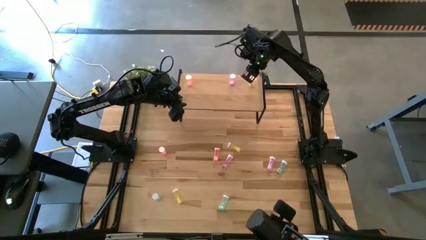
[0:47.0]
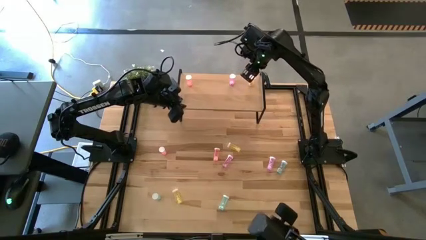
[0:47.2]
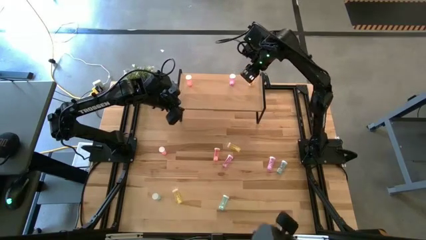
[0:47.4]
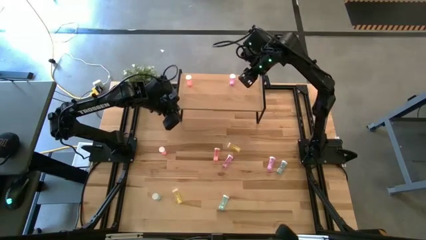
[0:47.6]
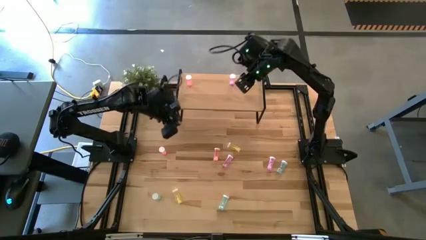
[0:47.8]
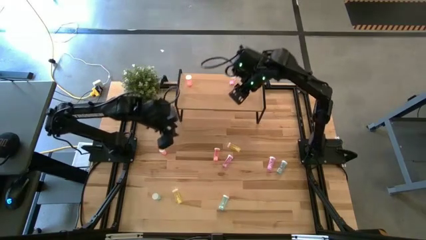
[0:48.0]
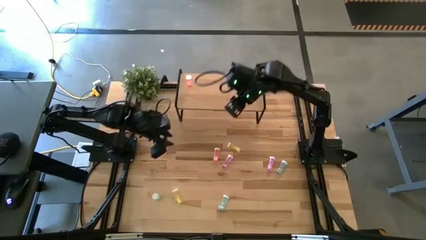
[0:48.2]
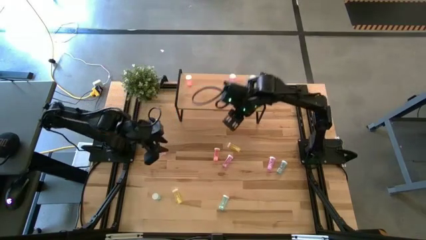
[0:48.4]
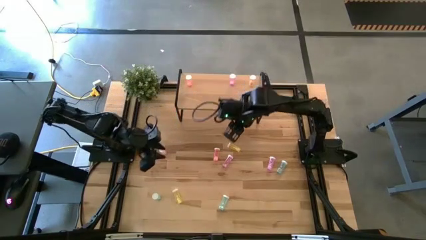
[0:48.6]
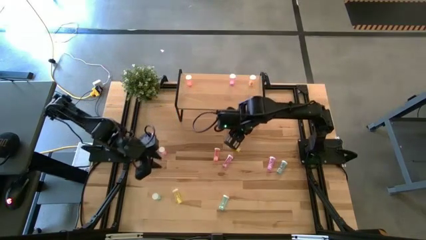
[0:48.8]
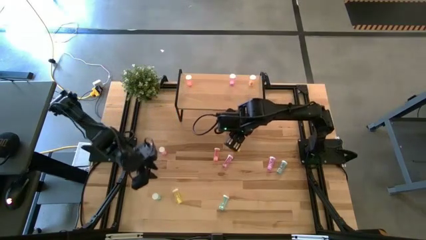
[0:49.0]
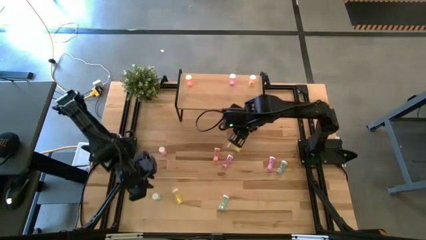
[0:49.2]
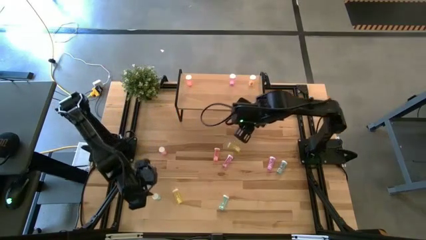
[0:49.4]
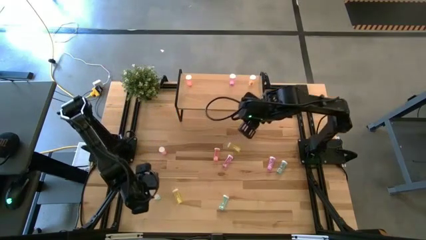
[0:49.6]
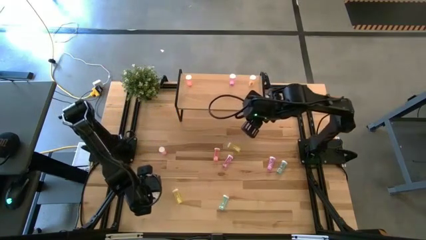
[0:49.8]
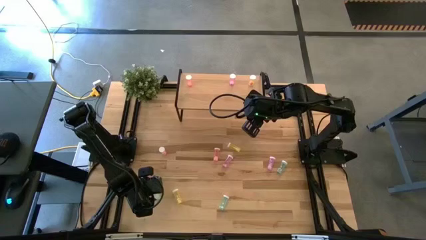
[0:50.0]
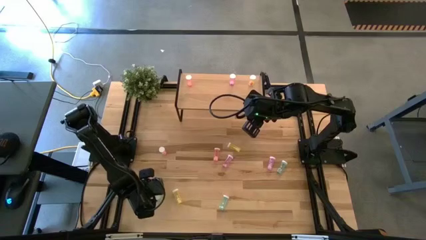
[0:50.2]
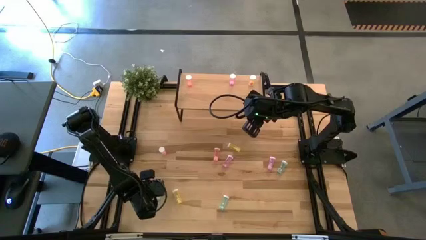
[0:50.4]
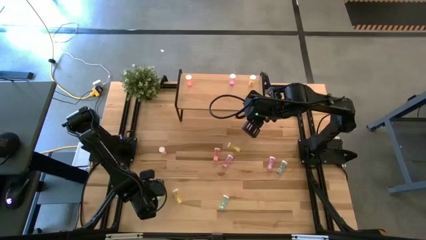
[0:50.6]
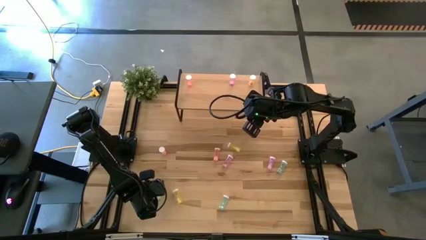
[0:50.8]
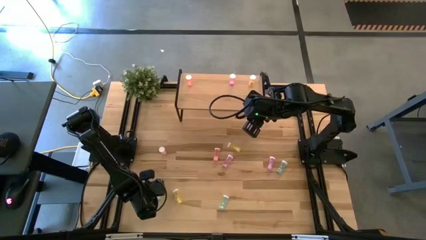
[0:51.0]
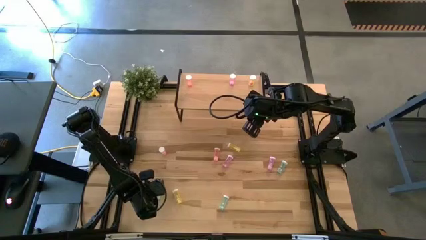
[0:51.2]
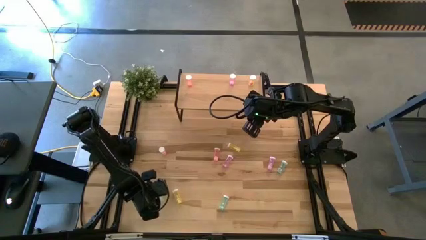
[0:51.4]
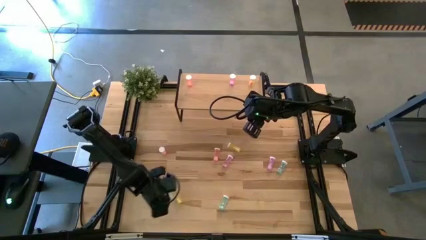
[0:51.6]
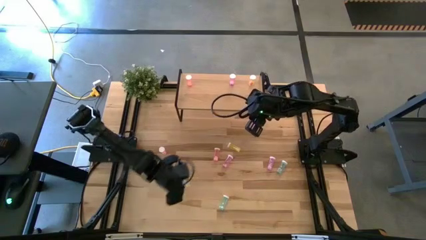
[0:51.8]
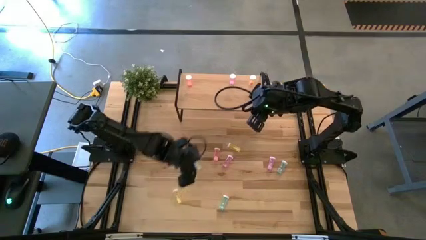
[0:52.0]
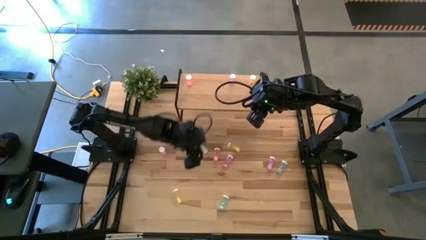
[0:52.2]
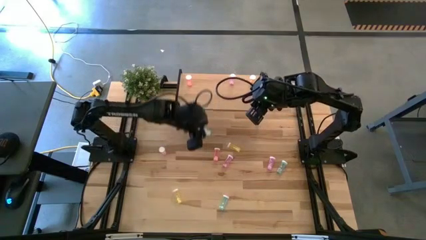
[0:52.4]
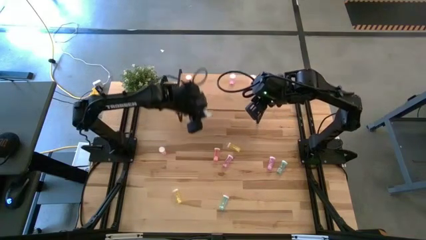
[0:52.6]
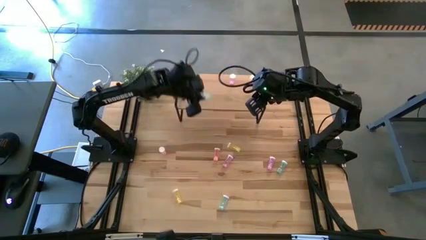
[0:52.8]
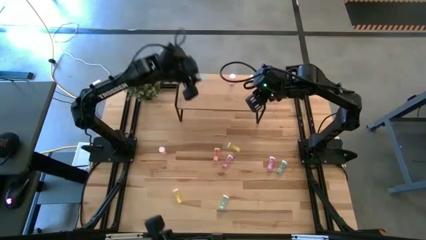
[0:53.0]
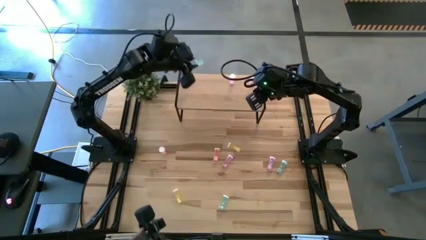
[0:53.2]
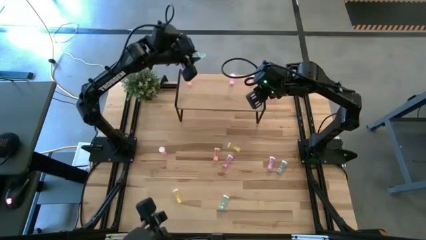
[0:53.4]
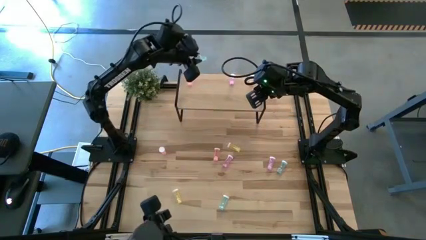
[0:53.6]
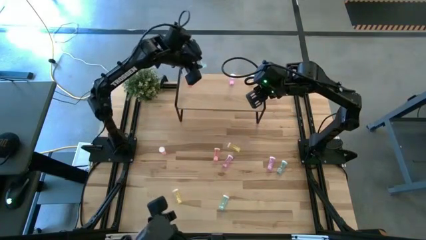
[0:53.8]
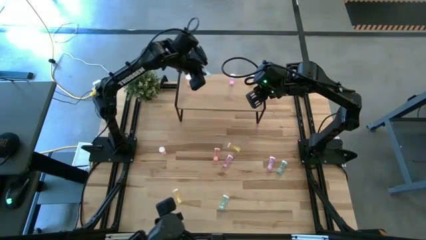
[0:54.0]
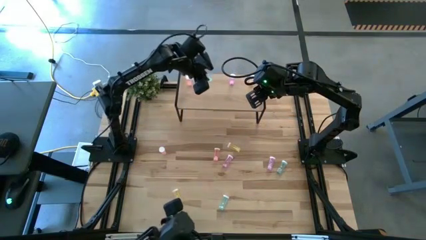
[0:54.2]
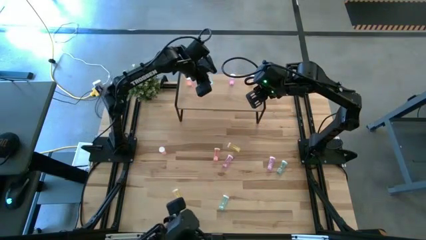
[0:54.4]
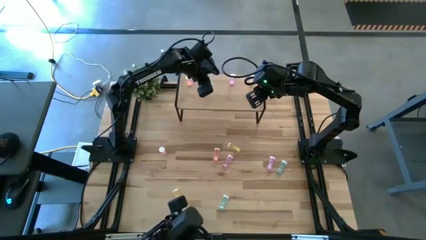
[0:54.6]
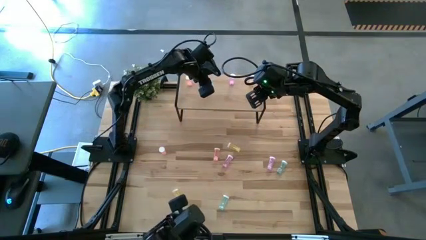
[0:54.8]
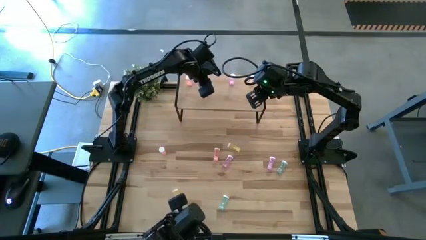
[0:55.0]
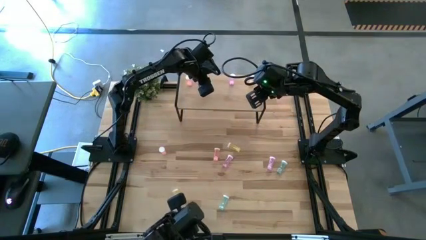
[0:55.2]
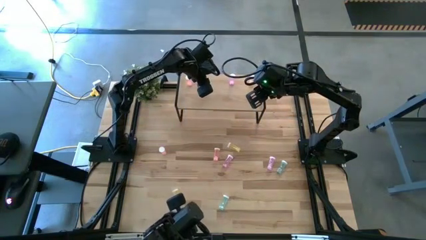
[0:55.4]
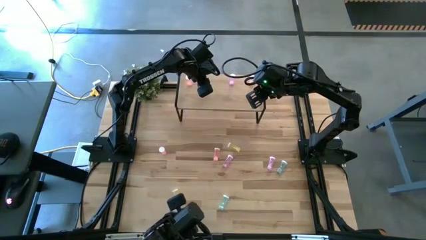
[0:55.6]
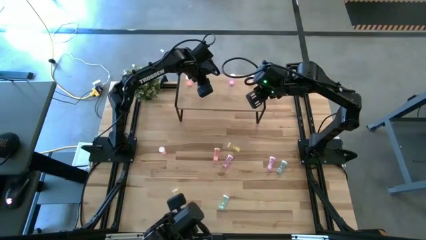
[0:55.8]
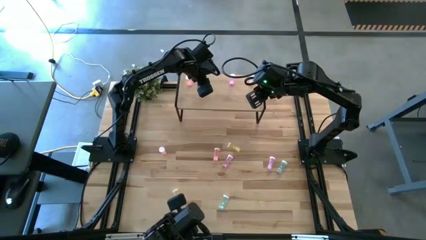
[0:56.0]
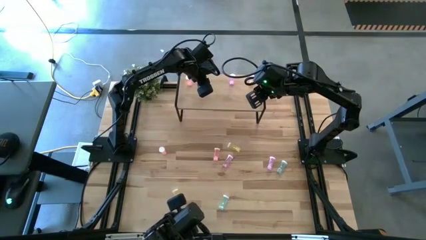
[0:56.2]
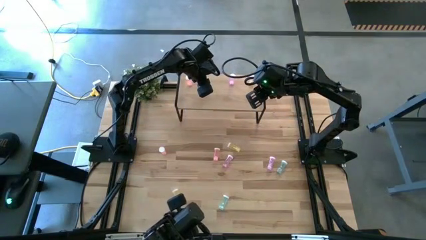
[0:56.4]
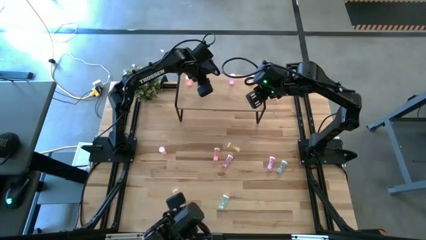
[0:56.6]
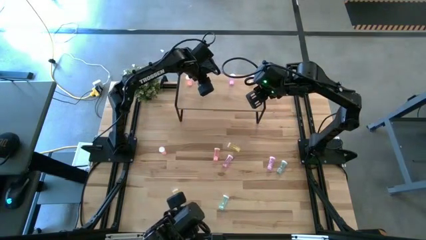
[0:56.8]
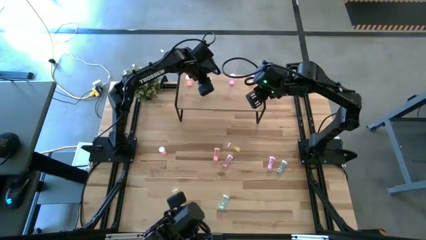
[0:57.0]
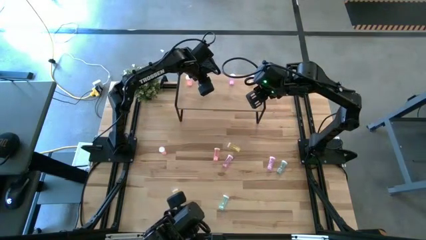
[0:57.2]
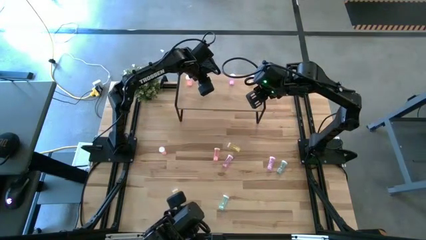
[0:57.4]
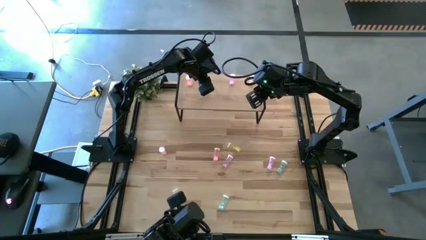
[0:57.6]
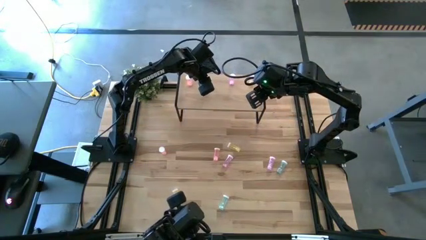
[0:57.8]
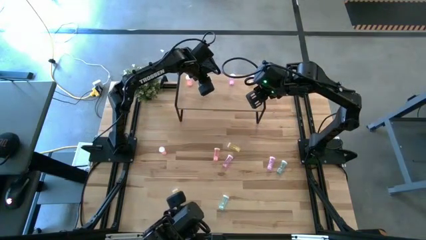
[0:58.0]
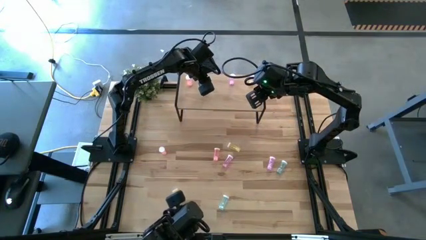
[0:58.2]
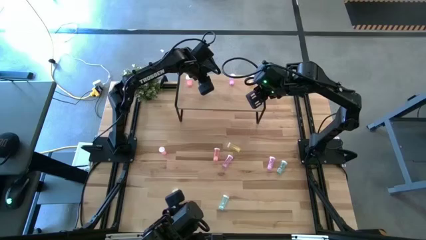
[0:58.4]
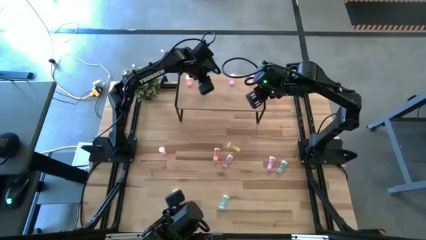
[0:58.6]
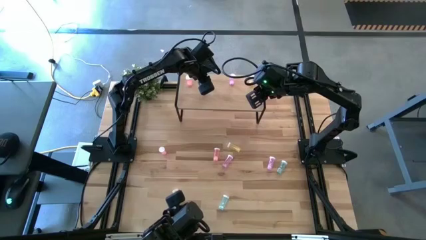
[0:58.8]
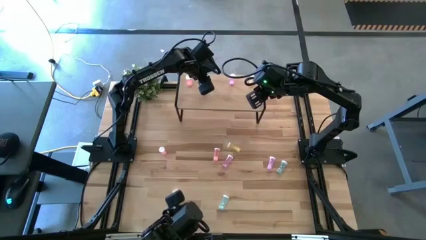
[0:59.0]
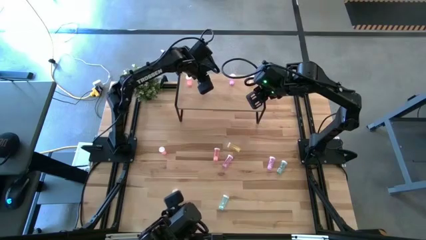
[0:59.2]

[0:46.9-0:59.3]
Task: Pick and place medicine bottles onto shelf by color
Put the bottom left blue pill bottle on the shelf

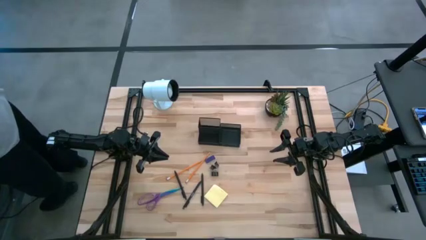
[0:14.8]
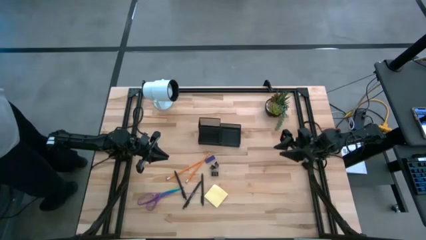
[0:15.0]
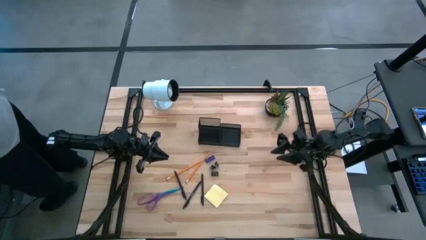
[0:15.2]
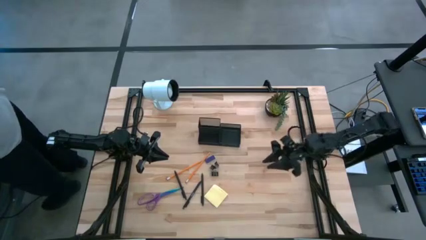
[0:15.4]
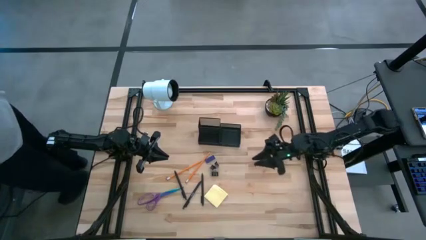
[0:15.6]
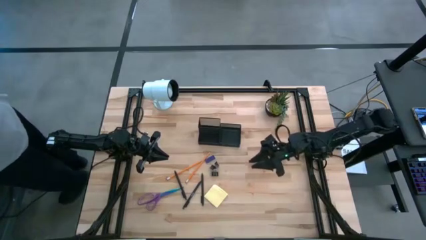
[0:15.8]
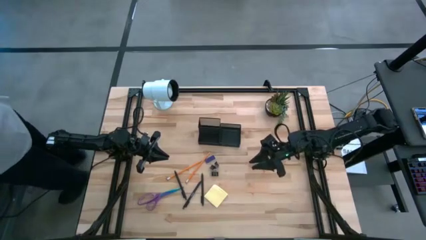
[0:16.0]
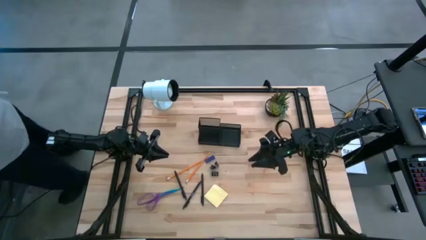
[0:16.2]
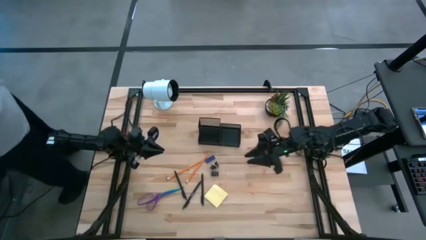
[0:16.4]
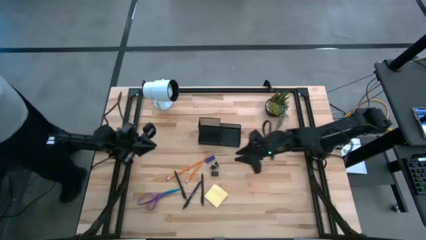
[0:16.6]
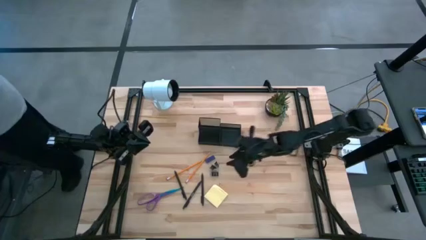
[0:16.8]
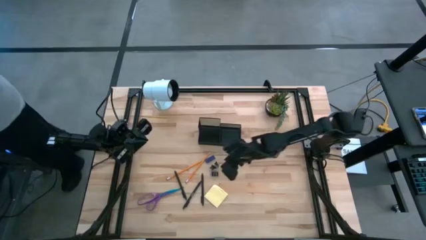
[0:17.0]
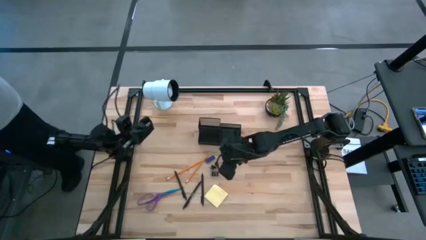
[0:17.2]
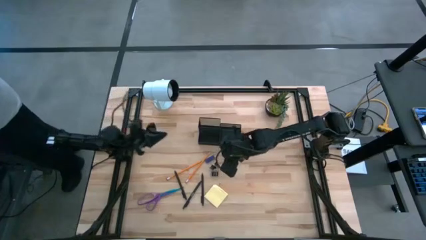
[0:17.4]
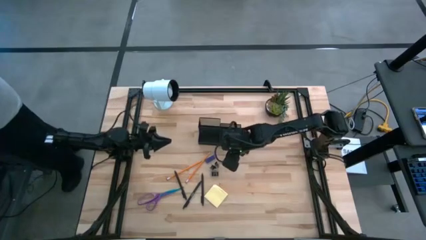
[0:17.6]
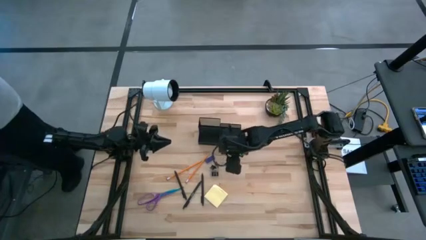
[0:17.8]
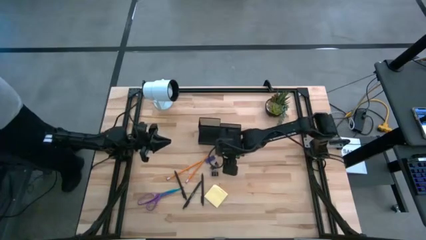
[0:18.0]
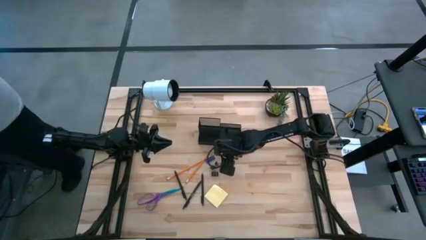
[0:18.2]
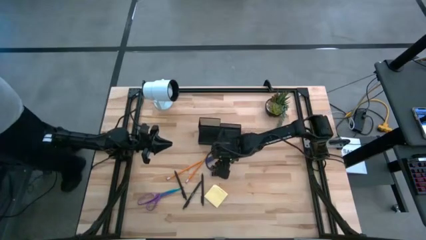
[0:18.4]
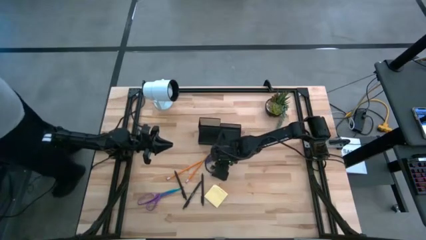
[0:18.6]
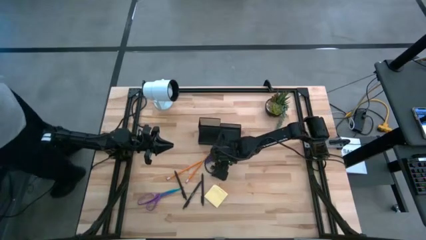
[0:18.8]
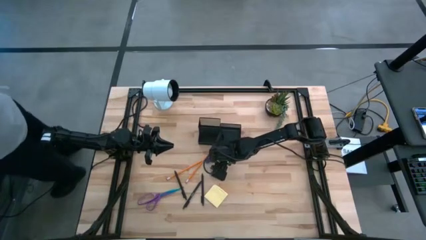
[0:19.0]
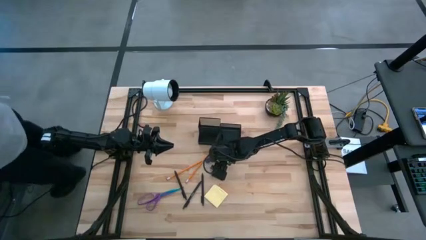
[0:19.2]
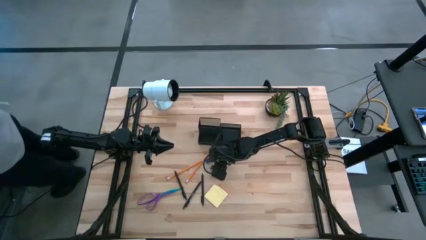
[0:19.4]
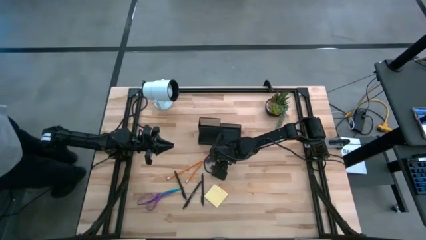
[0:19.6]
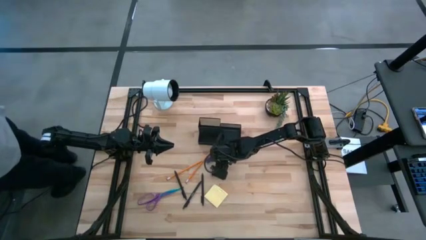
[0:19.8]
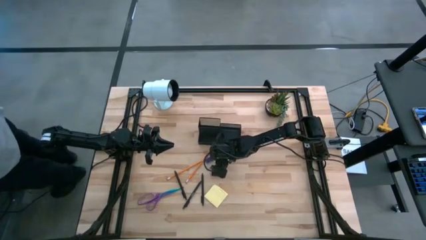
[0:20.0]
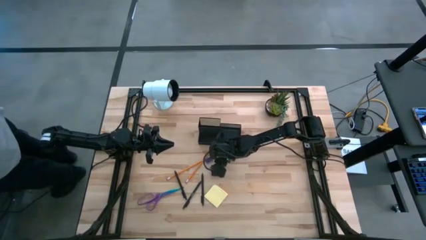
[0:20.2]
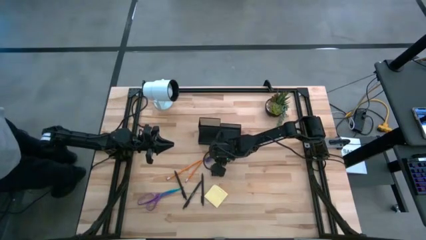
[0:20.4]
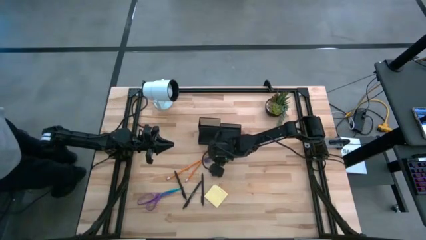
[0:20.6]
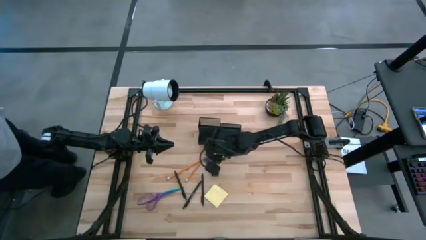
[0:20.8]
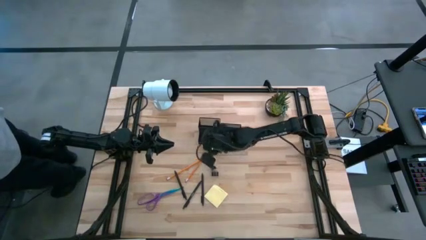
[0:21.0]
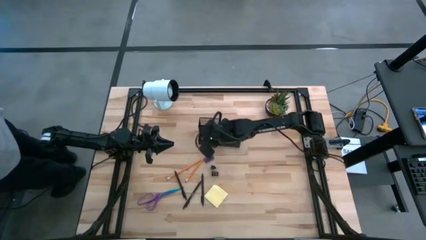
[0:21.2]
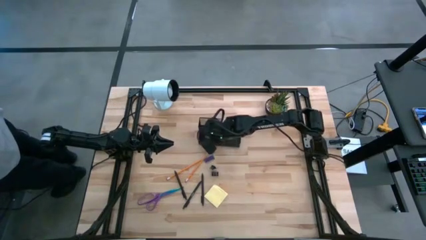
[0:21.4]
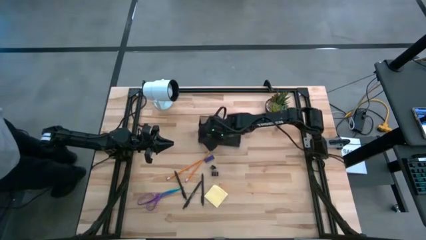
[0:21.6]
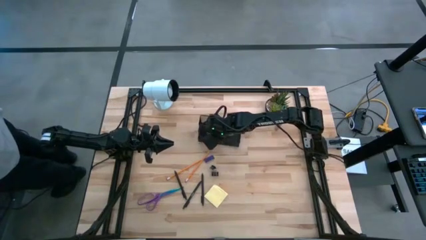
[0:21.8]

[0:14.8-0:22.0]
Task: Pick and place office supplies into organizer
Put the top black binder clip into the black desk organizer
